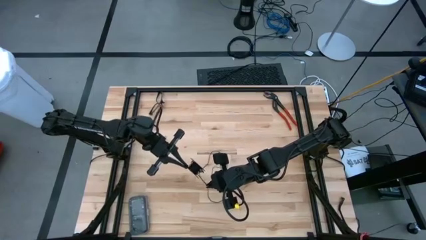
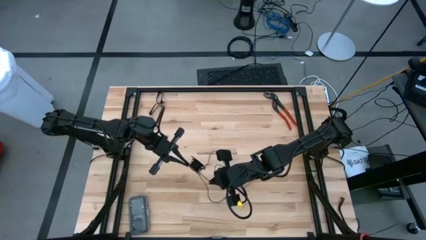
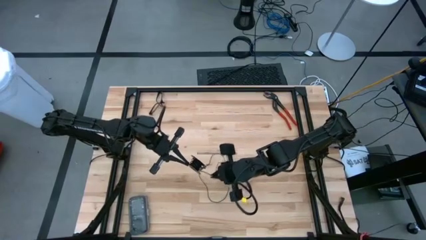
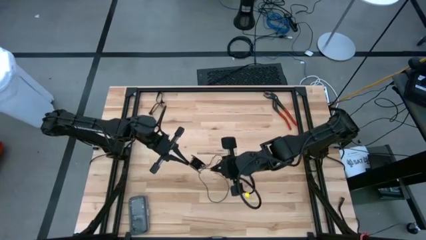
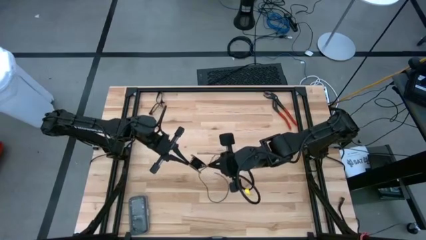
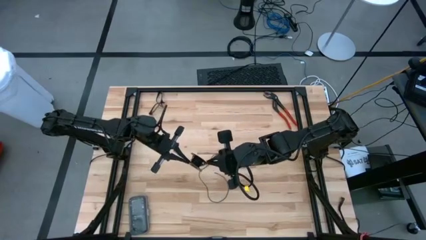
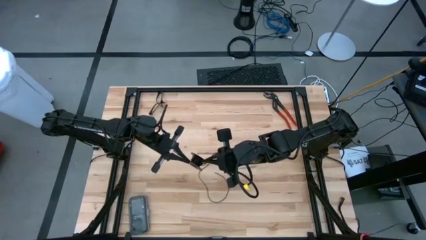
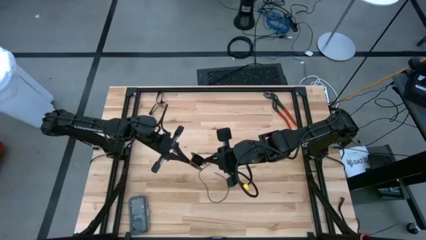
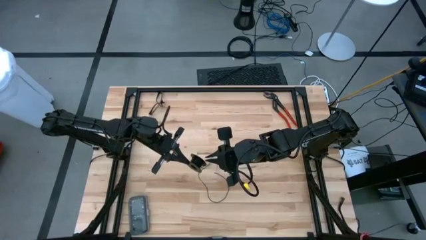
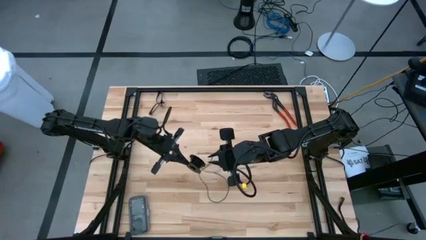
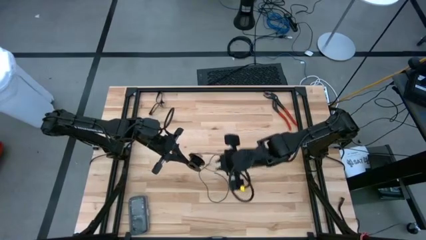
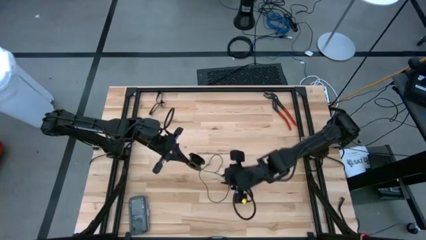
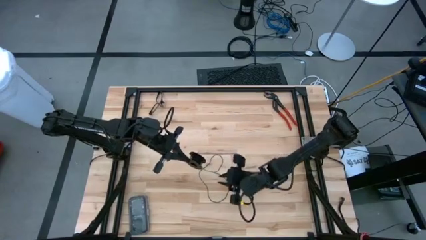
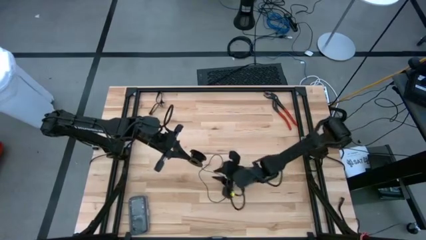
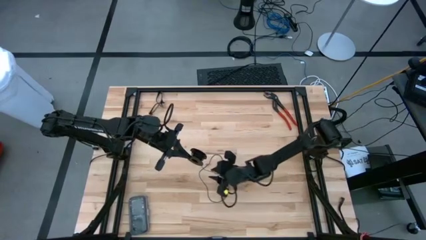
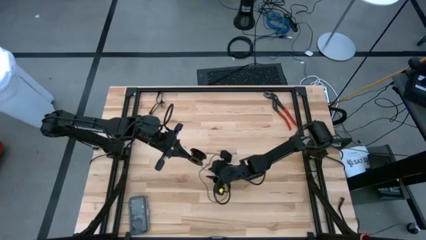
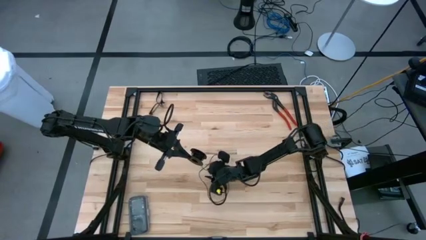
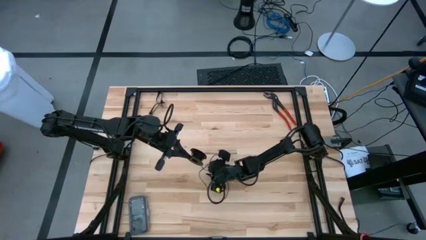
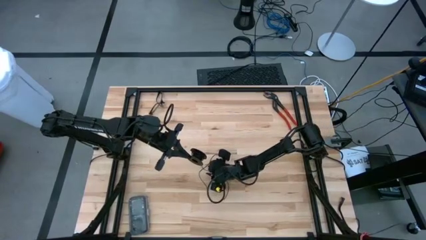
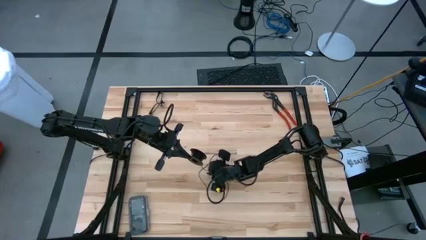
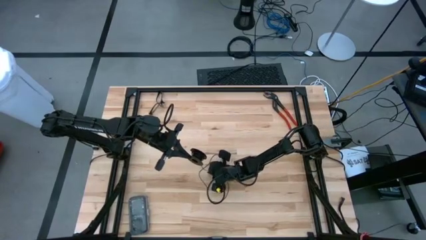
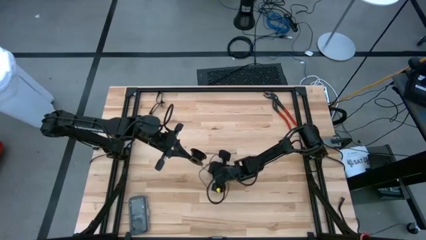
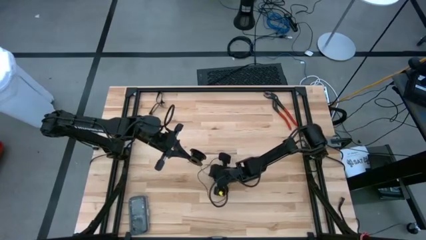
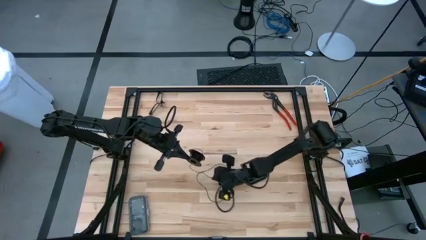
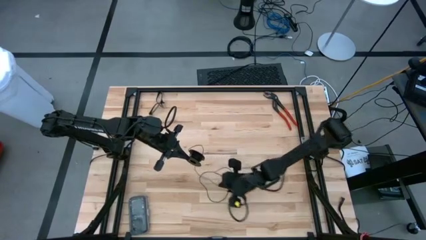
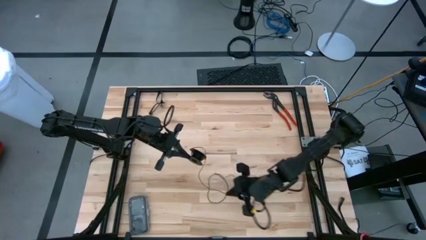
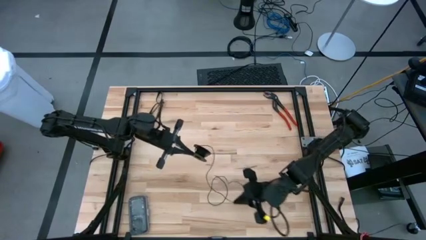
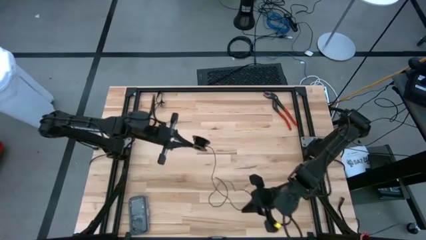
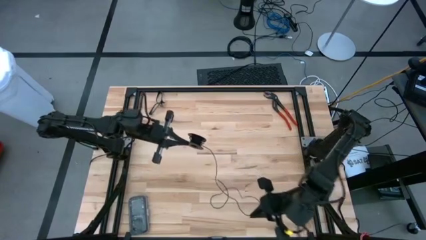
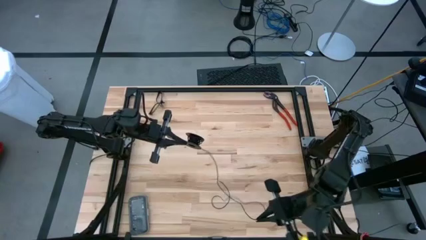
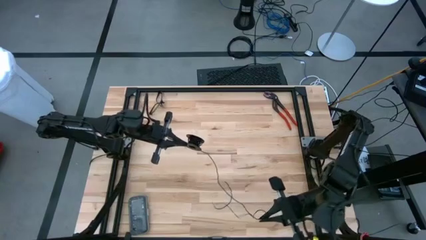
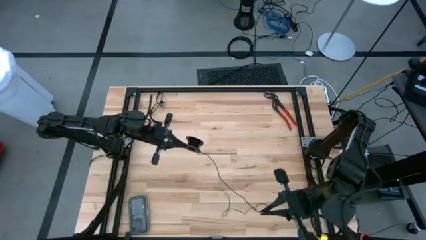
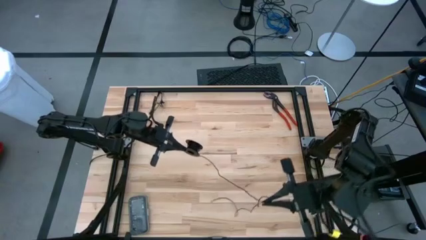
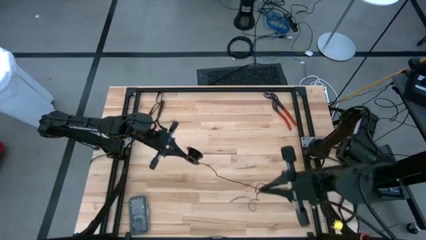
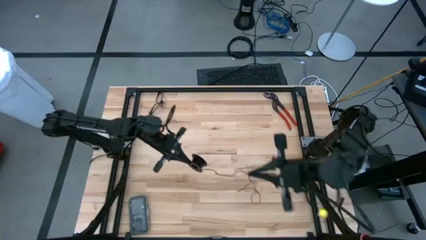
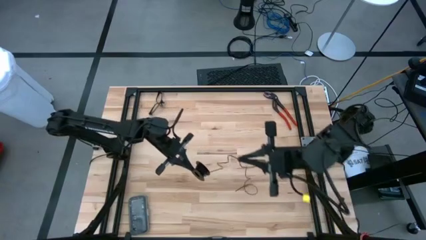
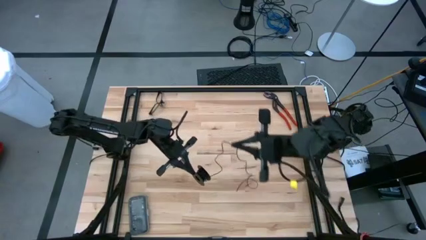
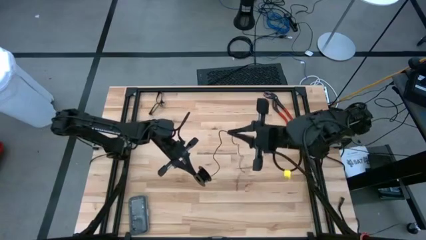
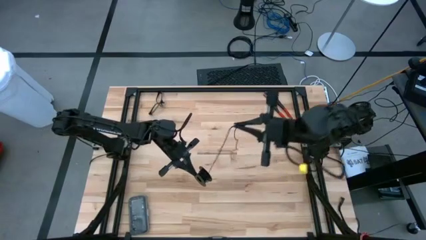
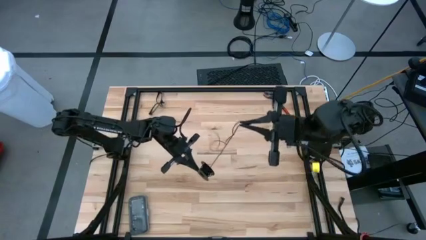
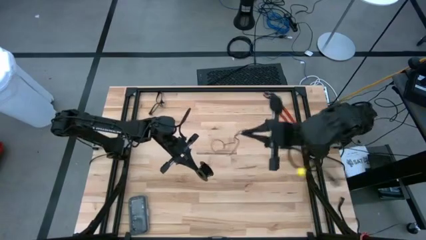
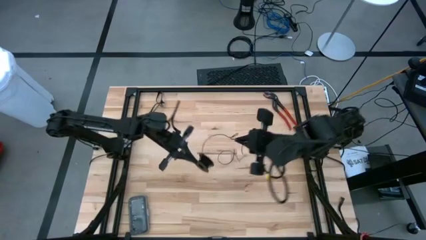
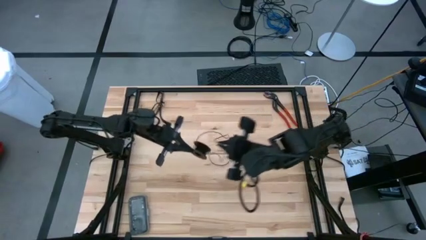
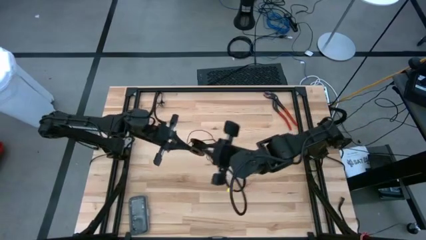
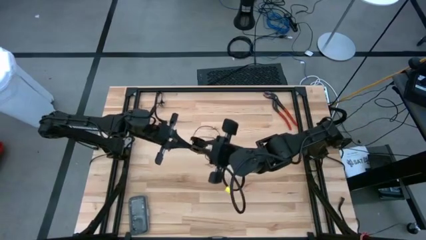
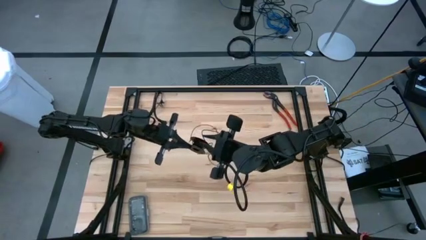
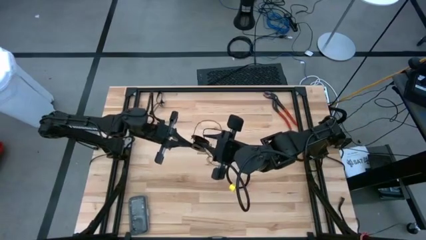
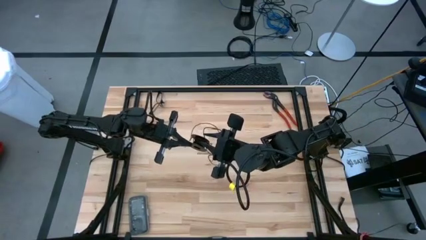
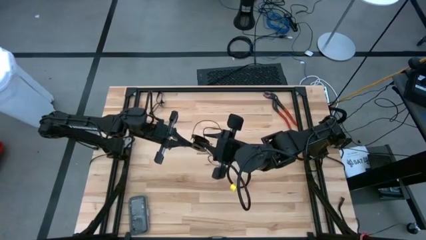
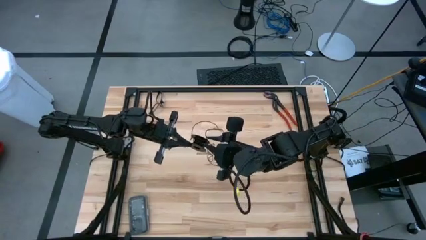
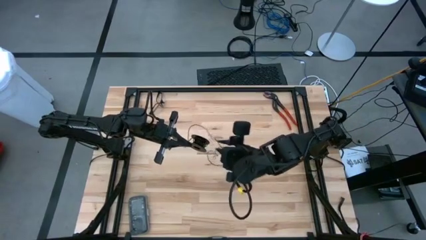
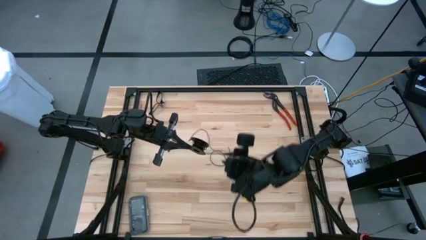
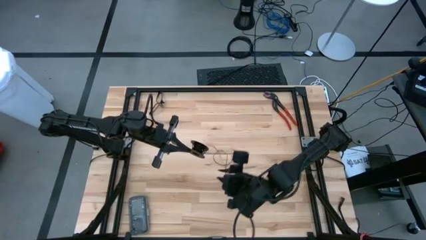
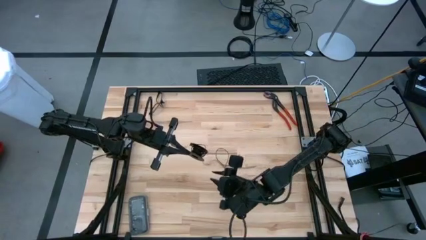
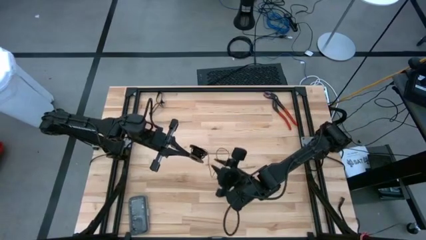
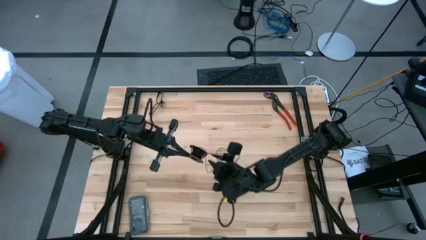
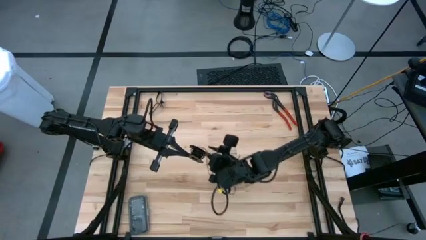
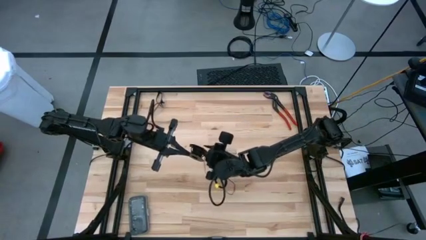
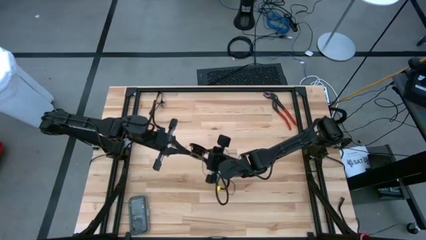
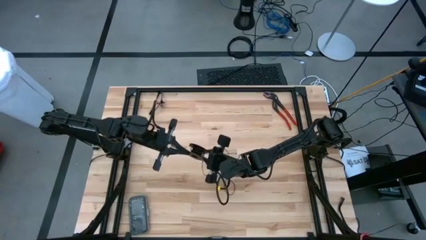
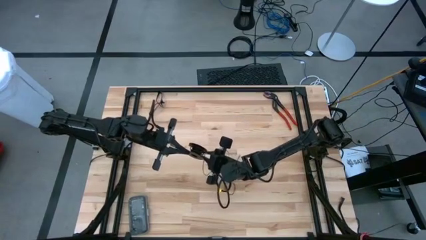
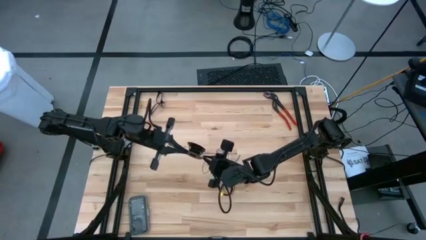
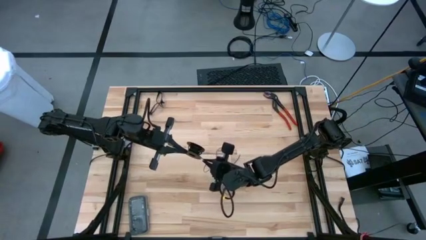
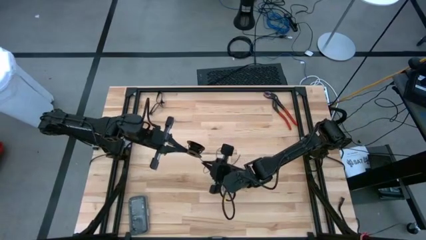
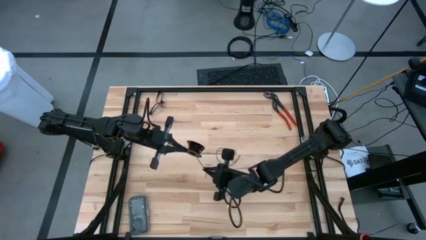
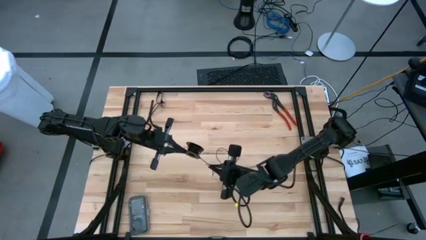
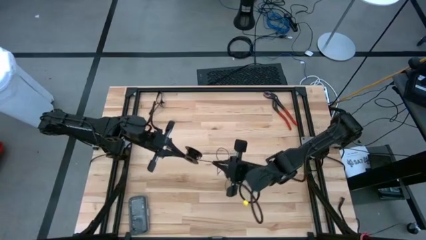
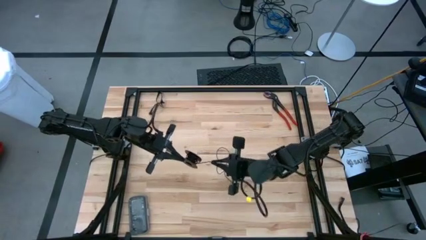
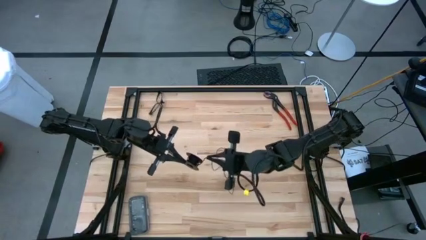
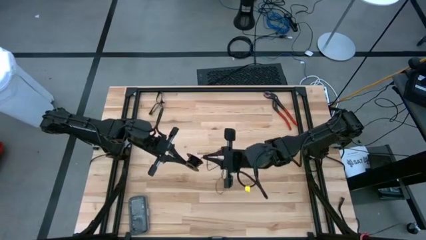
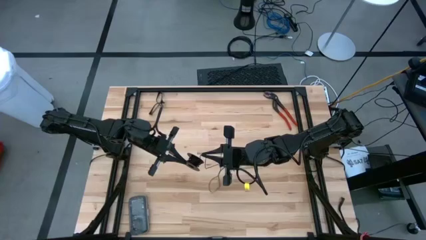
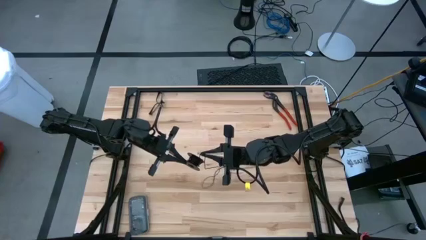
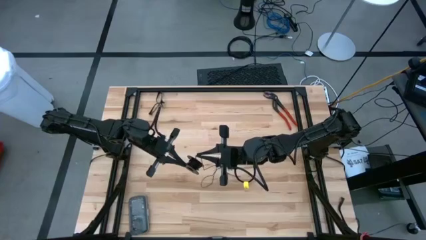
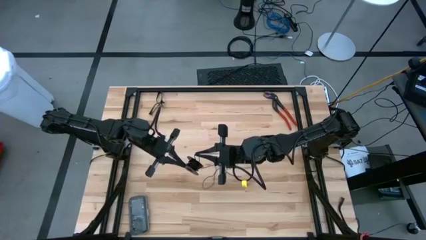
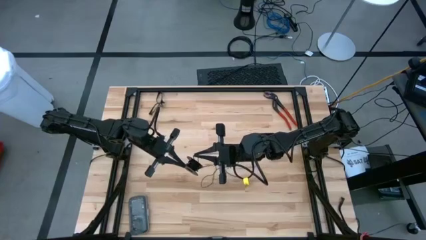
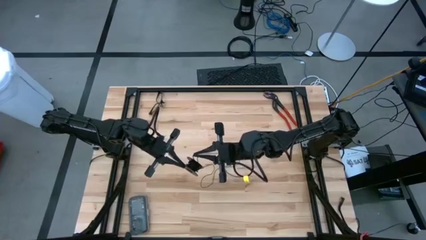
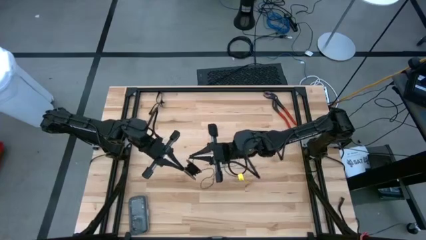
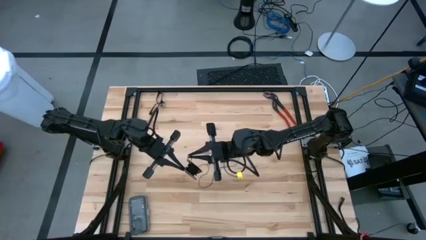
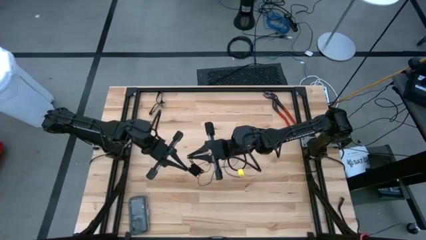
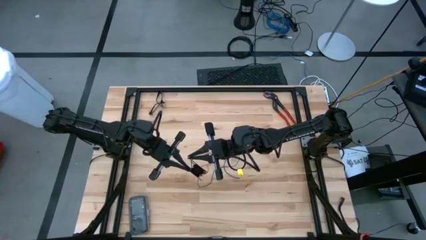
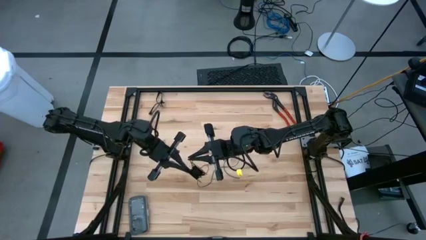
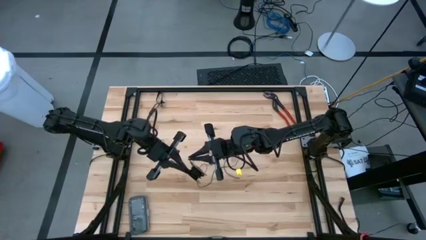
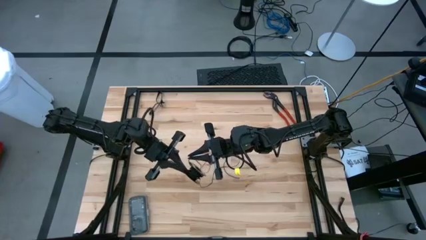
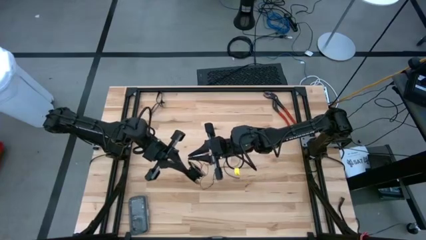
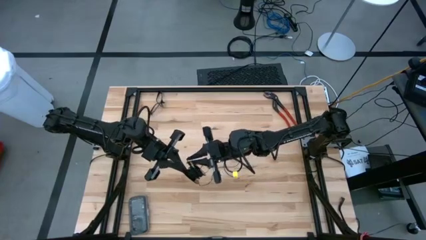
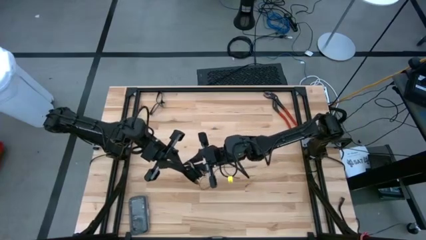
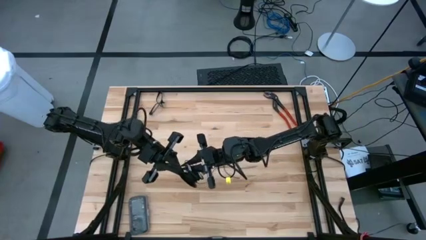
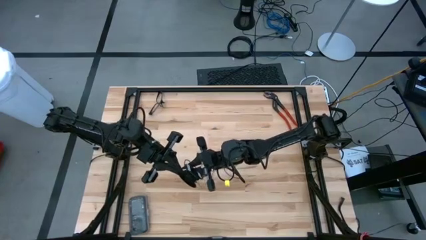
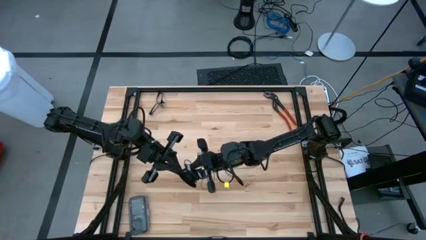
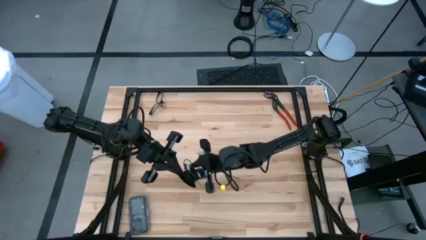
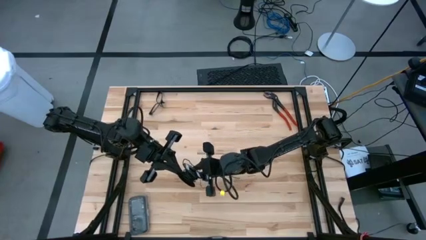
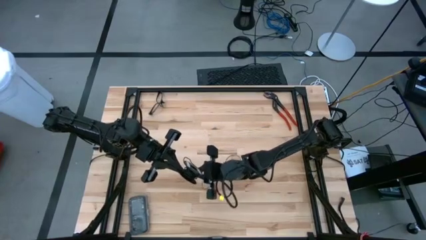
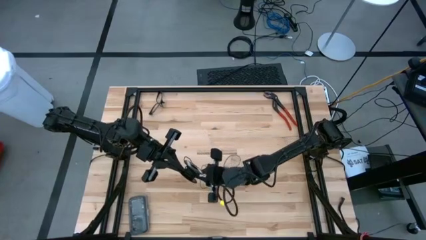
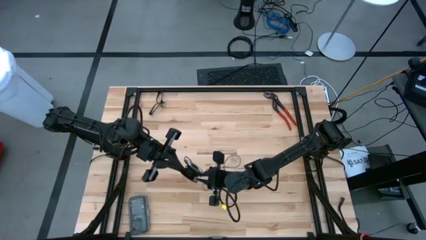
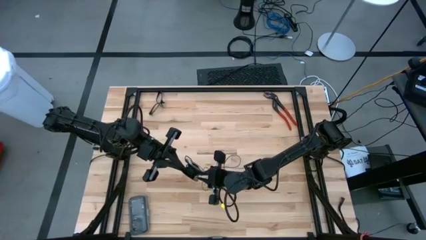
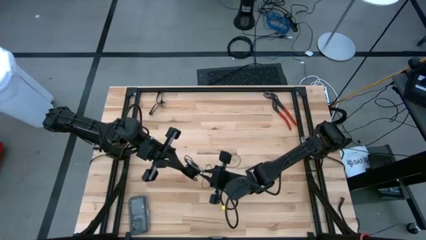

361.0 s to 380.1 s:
Task: Coil cords
Coil the black wire onto the spool
